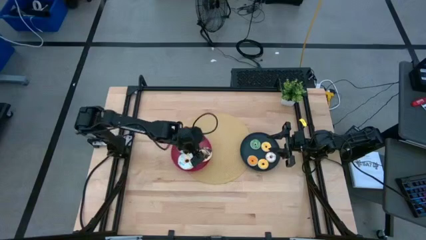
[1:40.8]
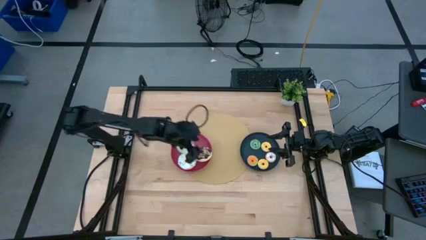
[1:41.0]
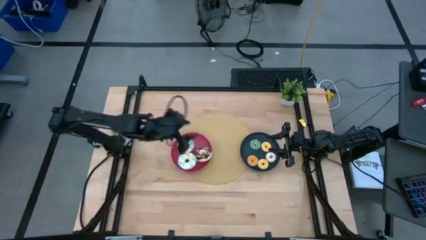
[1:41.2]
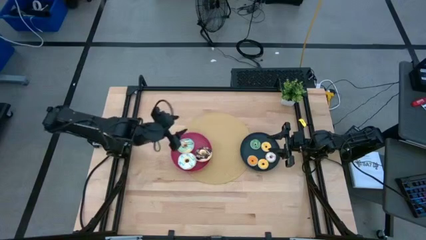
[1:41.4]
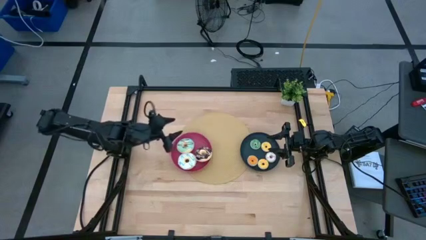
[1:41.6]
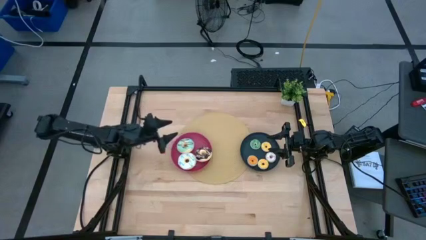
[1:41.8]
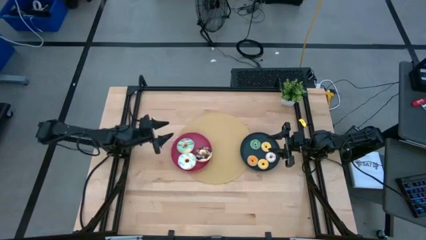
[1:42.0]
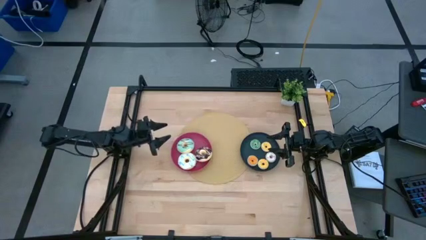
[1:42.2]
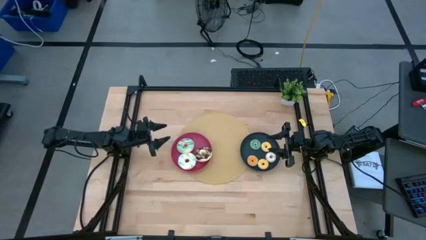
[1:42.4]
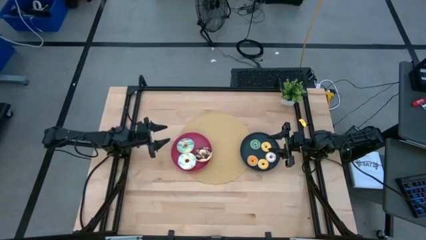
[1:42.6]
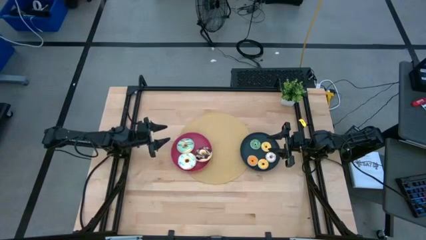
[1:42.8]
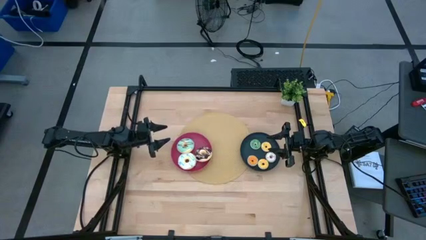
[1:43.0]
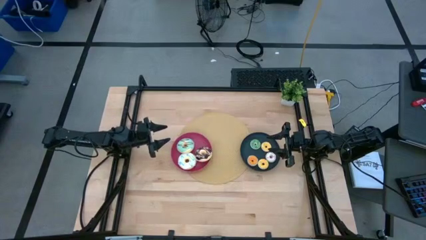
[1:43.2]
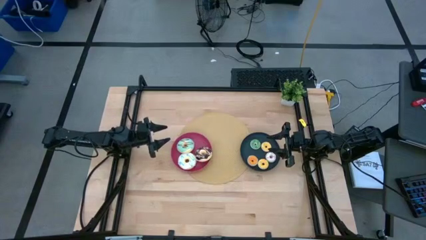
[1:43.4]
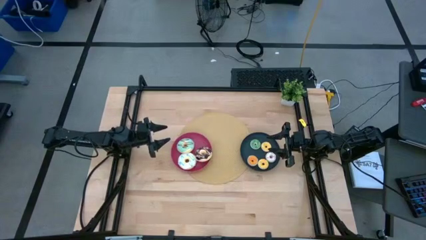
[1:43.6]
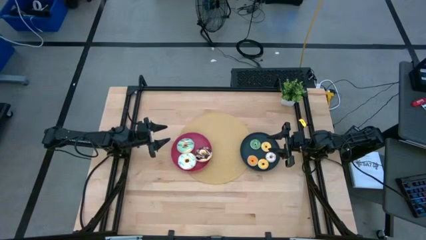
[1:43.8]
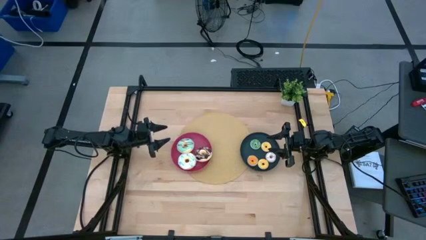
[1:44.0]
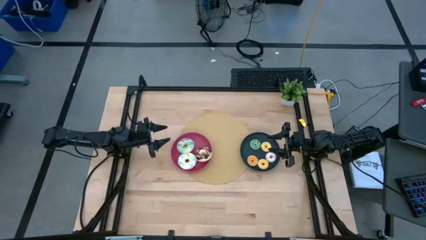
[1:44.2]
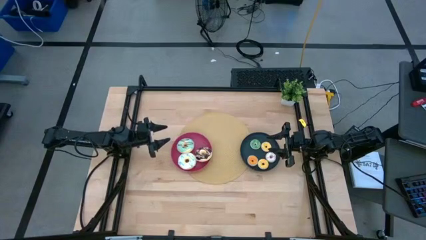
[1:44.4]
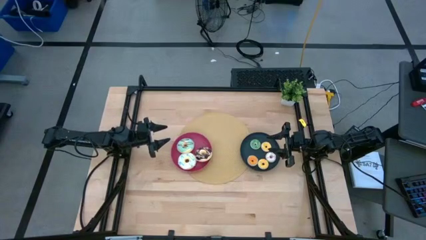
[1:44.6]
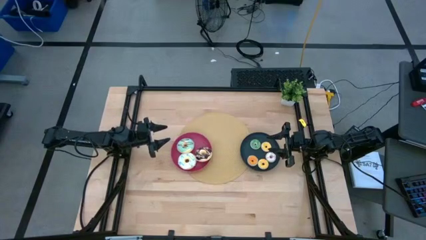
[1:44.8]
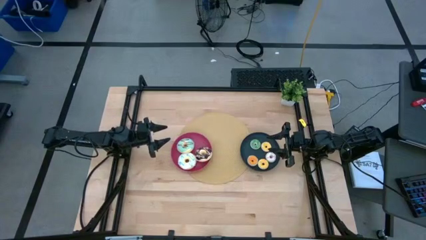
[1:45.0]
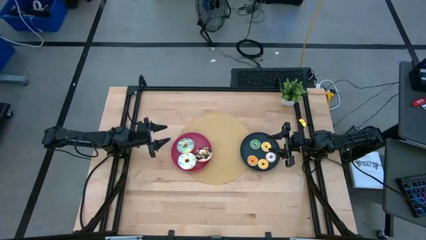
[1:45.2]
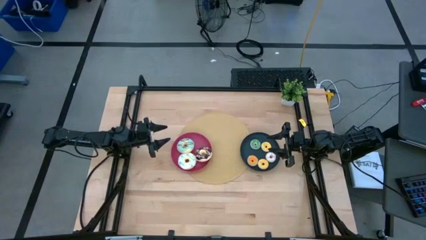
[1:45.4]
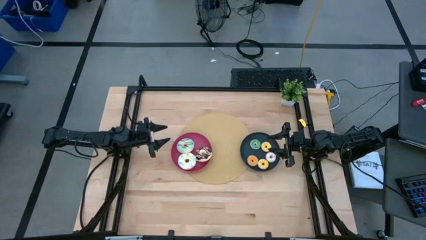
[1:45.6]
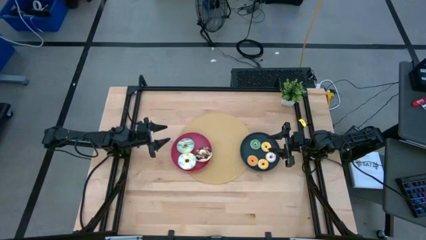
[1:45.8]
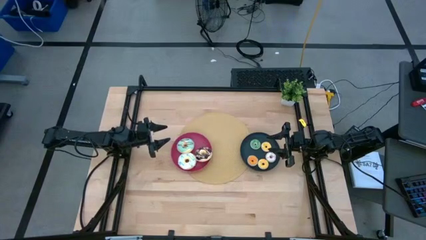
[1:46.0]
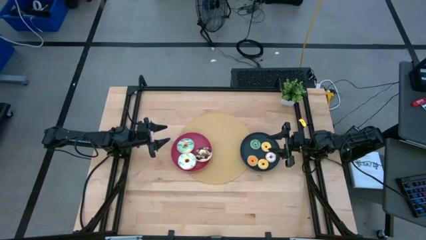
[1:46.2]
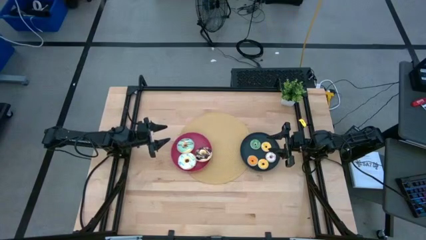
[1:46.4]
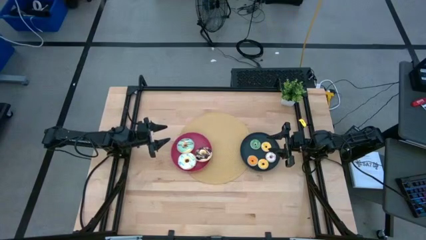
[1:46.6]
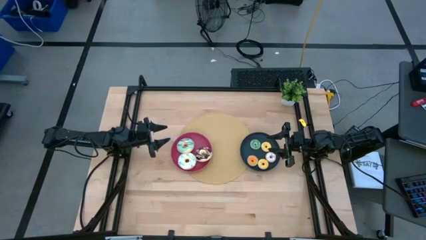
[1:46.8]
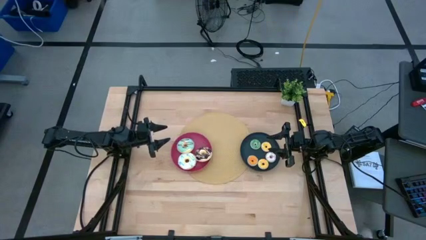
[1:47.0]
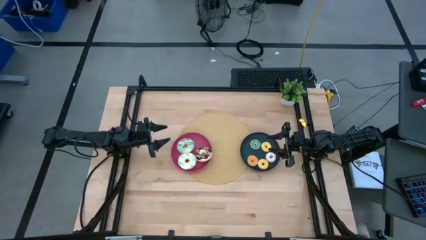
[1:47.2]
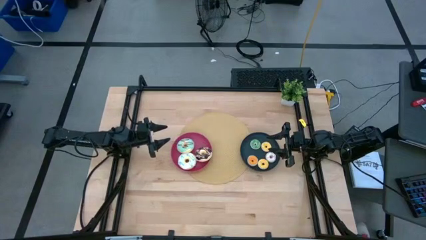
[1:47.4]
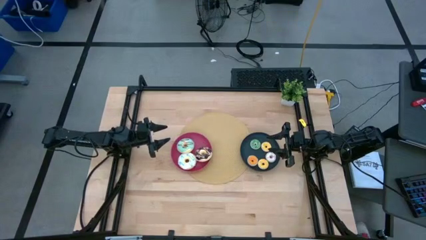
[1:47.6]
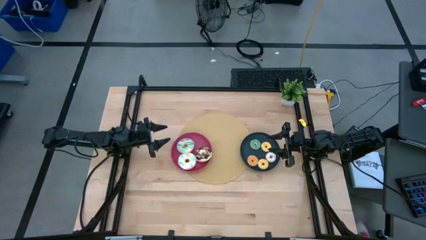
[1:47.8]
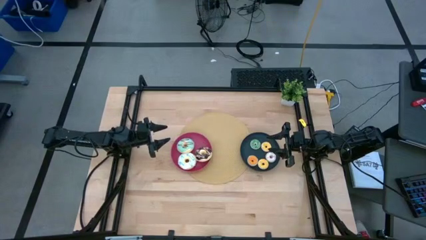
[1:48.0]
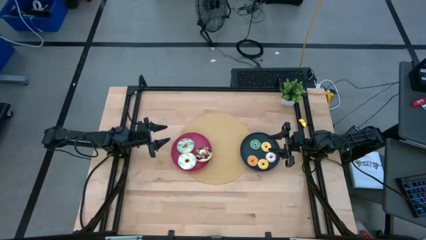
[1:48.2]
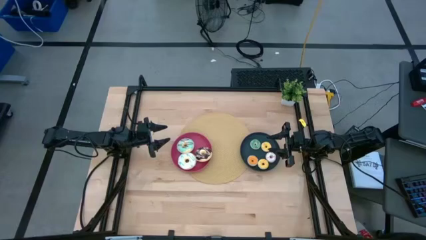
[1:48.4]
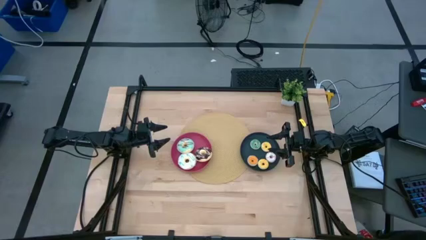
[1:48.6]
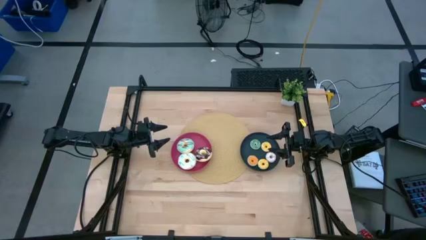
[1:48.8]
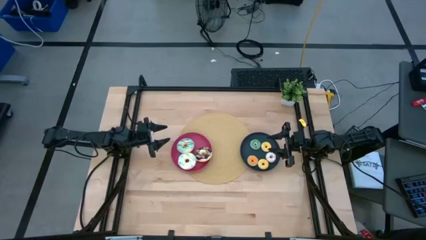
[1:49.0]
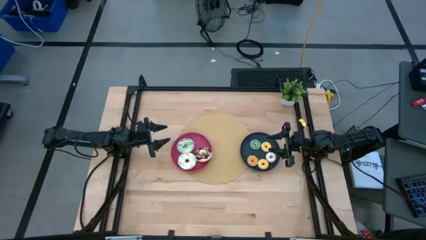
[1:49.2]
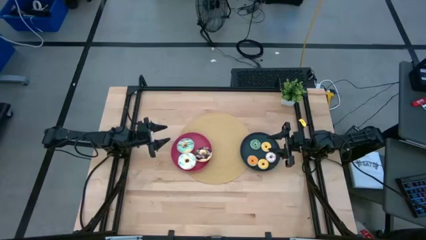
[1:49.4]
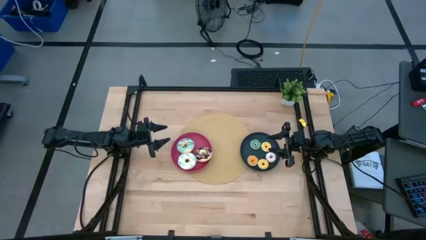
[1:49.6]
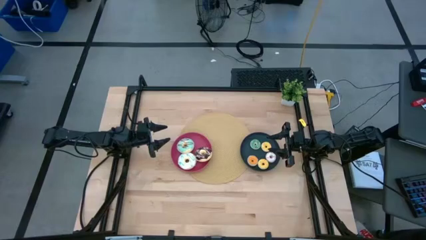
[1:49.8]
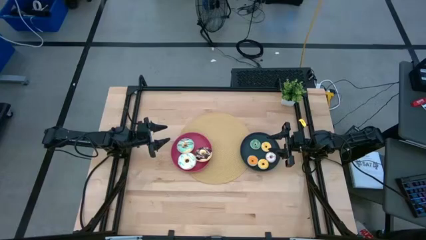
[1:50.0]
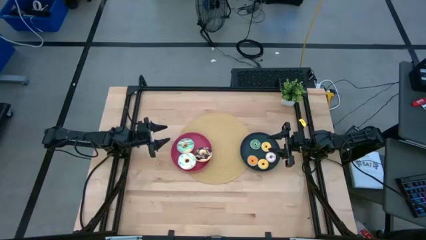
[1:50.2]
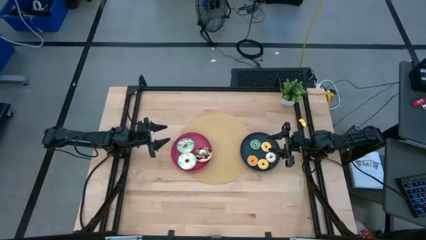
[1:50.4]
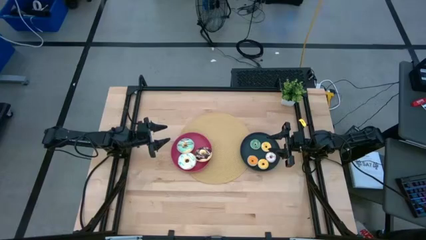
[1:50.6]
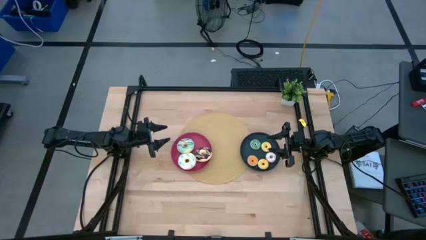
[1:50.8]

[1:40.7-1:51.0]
Task: Pick & Place donuts
Return to Home Position
